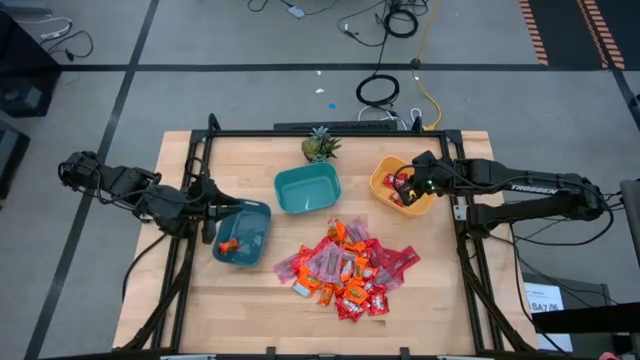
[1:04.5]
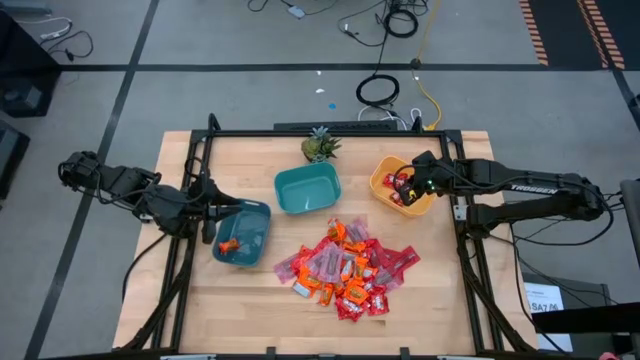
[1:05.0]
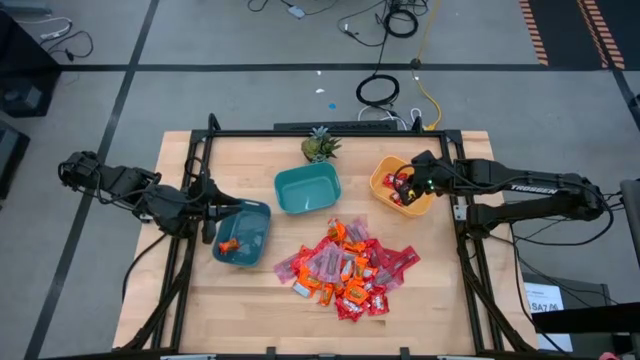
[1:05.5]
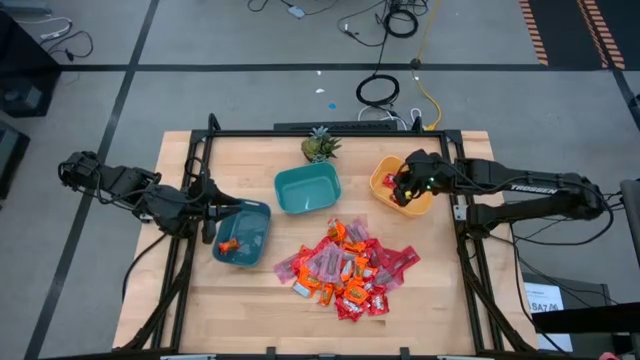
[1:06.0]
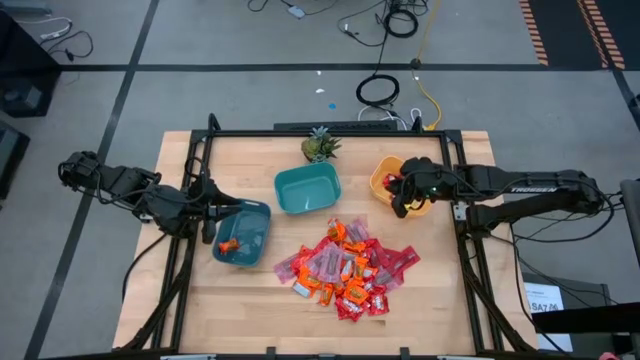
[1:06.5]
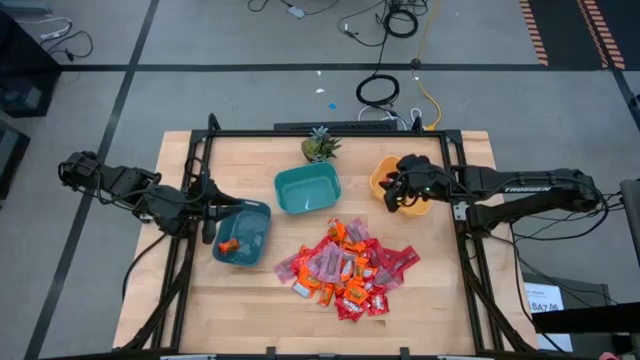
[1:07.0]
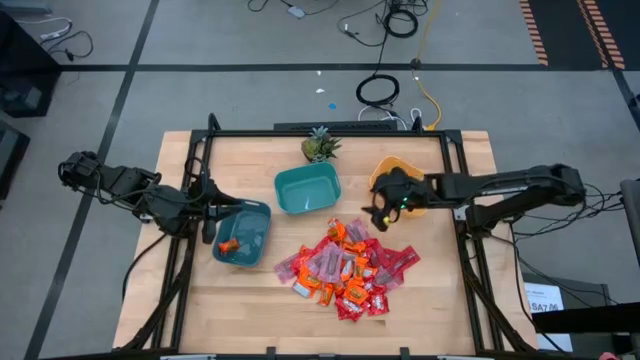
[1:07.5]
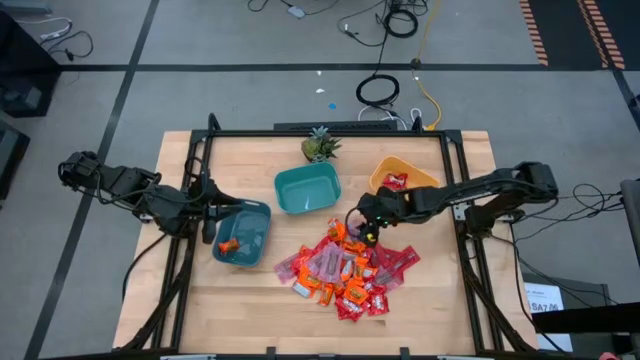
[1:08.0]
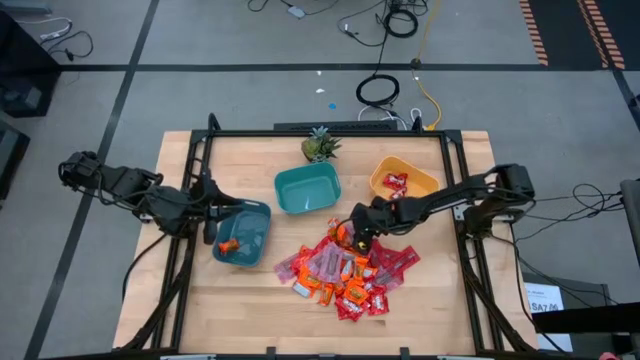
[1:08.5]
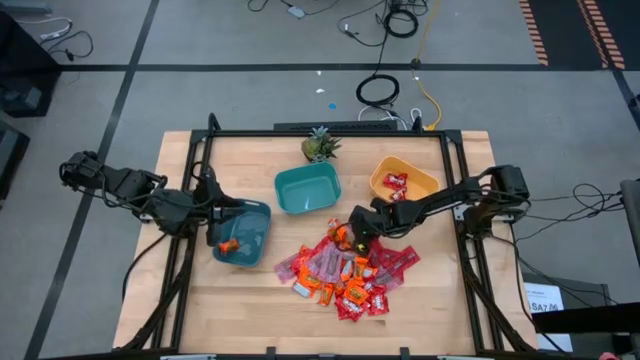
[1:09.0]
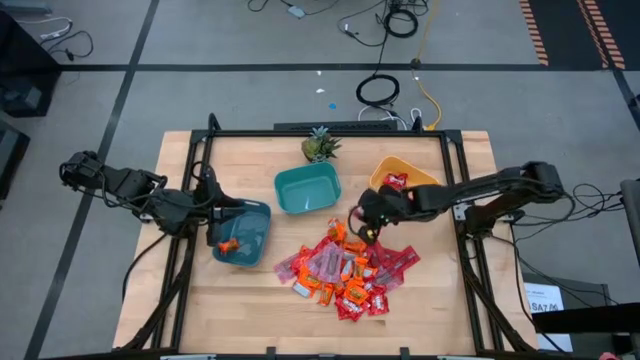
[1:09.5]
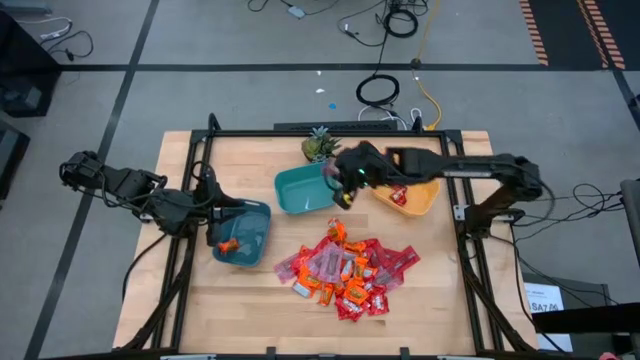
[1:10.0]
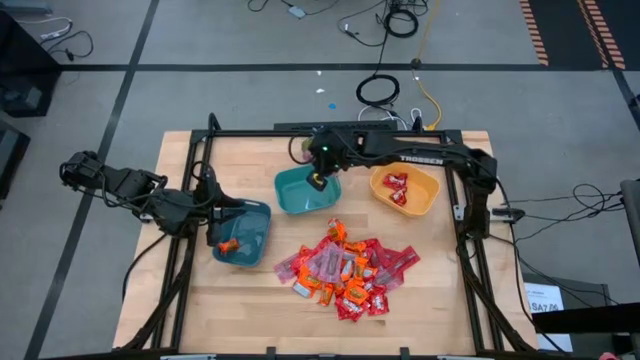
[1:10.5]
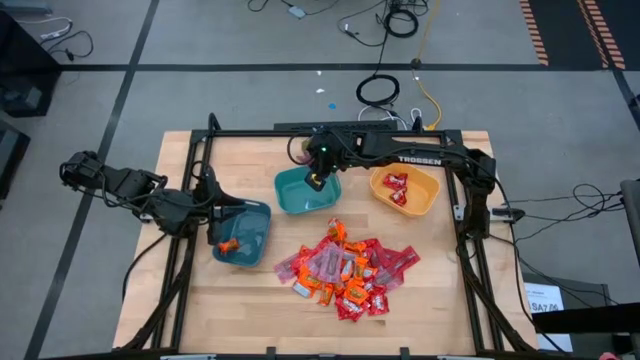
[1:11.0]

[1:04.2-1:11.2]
Task: Sort candy
Put the pink candy into the light blue bin

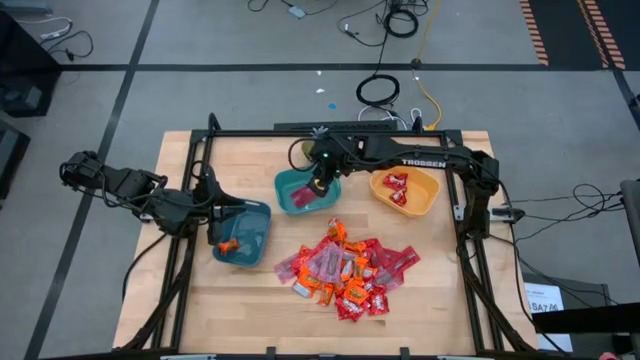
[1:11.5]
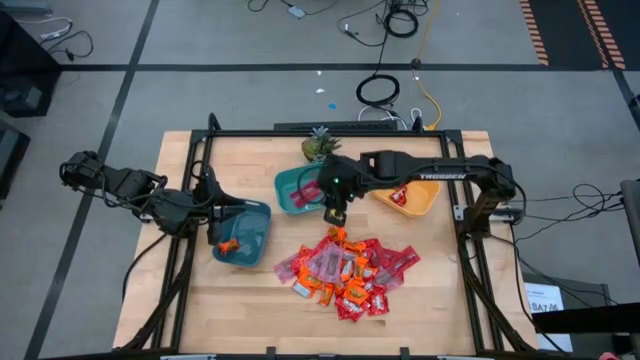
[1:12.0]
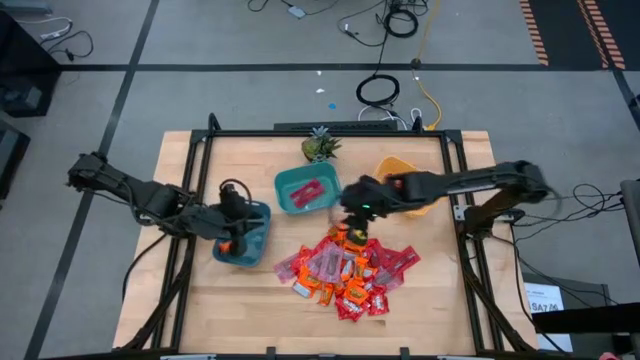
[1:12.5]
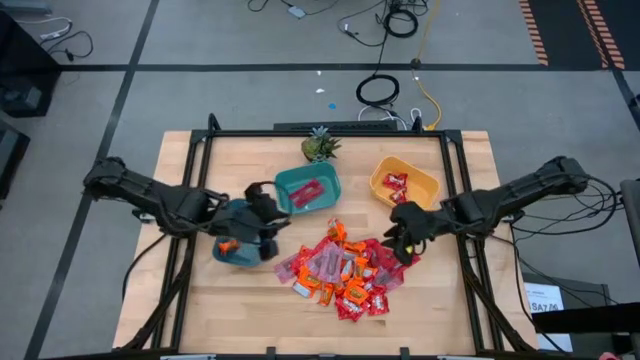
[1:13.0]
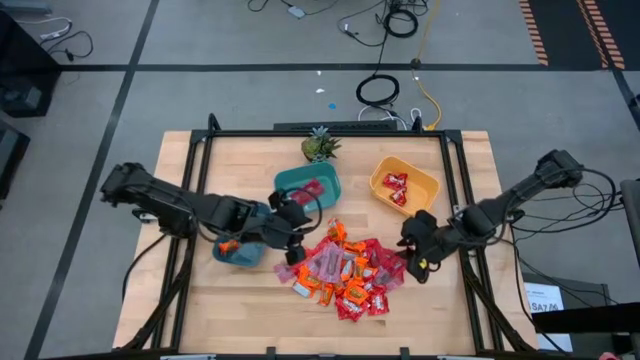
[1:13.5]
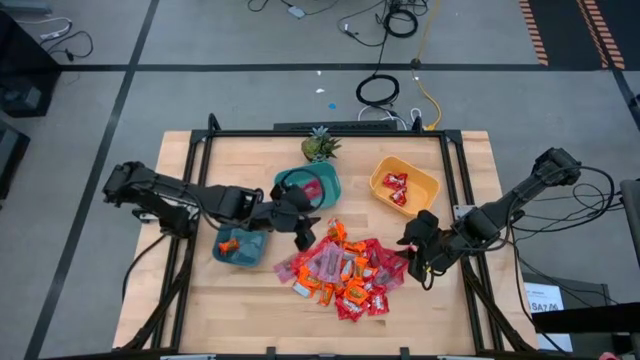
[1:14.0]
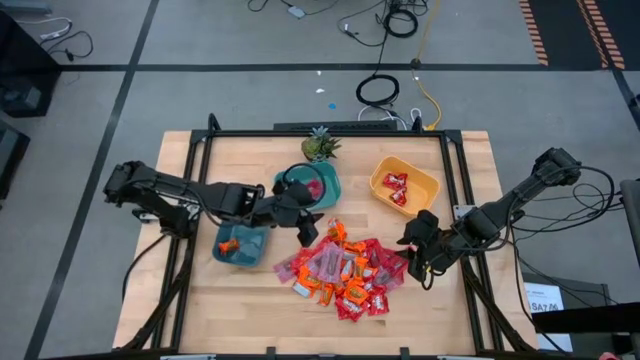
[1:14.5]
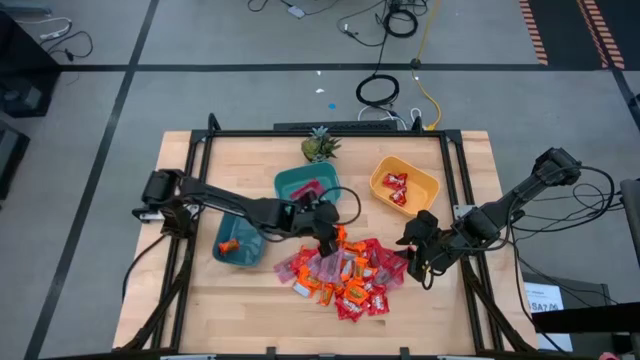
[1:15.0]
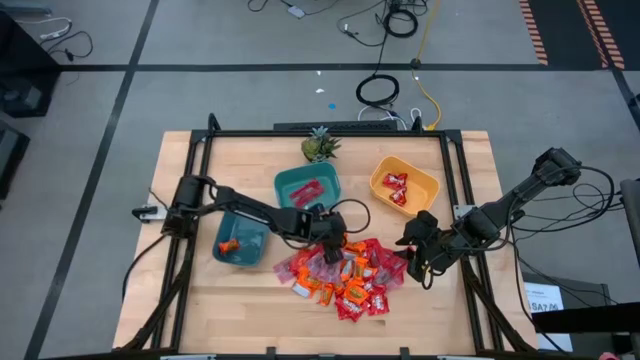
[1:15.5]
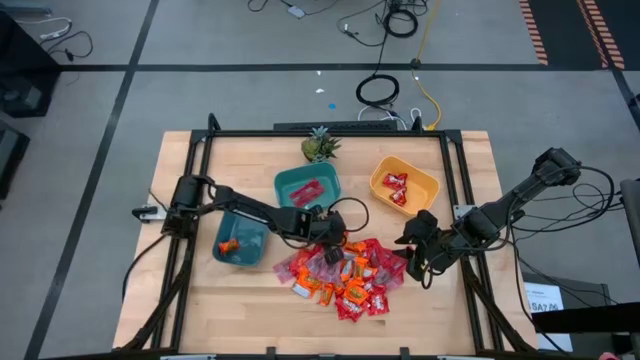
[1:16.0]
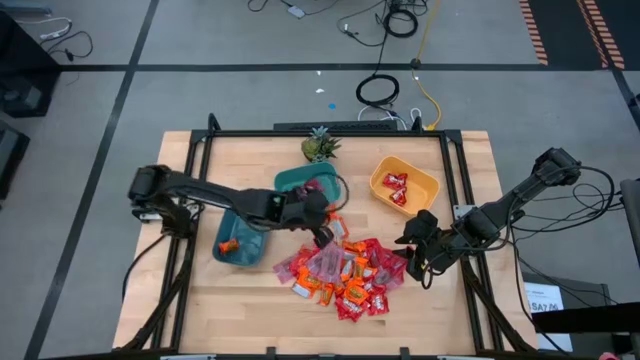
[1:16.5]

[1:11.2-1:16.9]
Put the orange chocolate into the blue bin

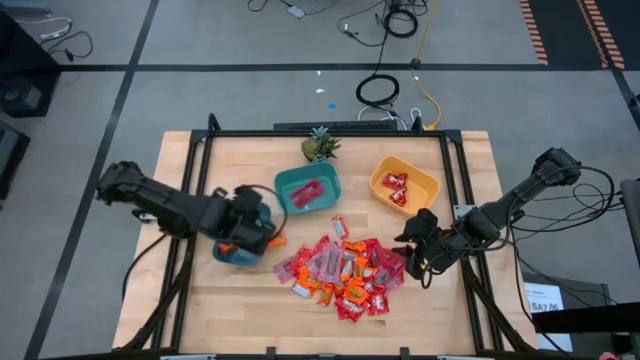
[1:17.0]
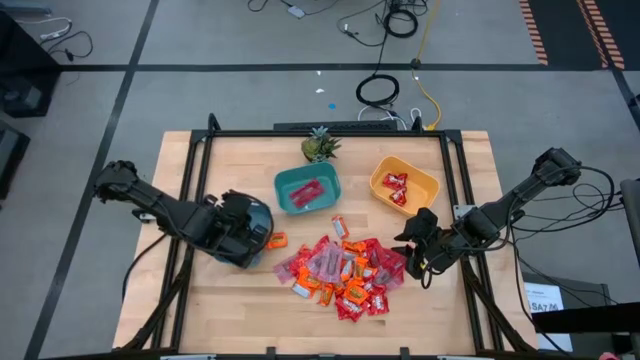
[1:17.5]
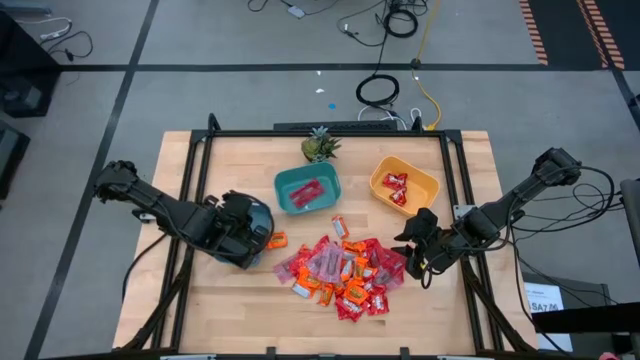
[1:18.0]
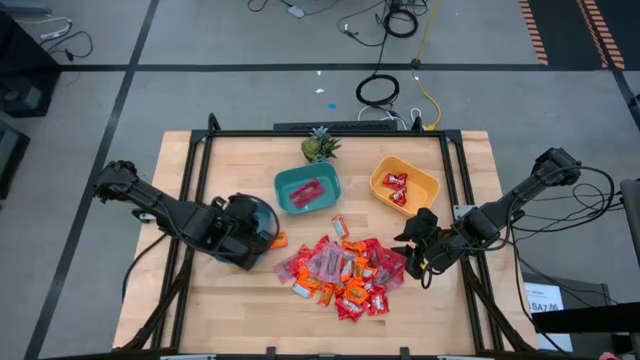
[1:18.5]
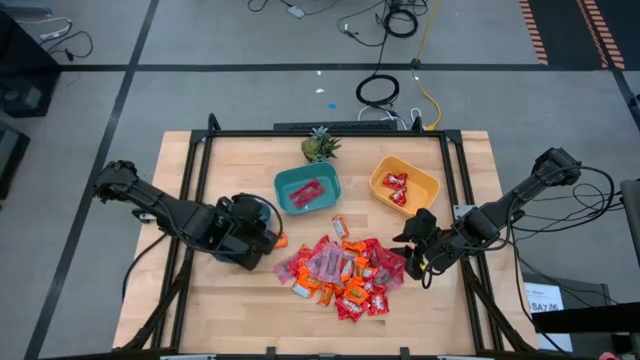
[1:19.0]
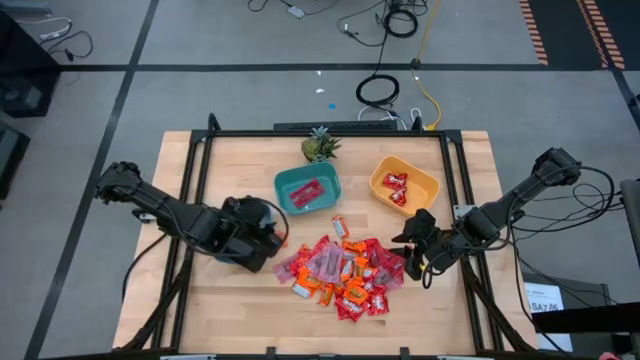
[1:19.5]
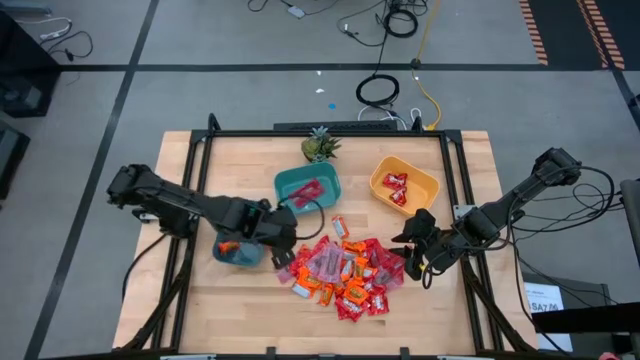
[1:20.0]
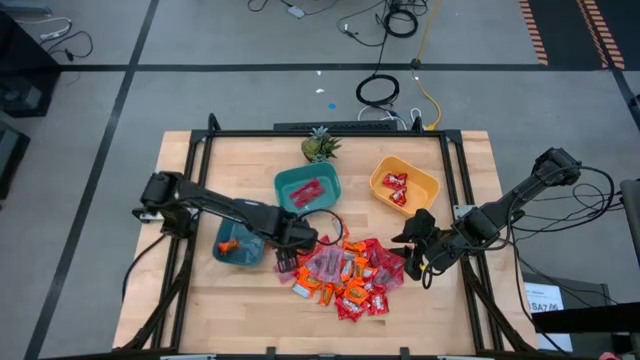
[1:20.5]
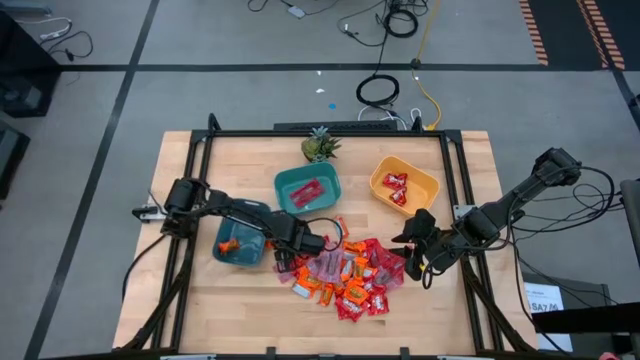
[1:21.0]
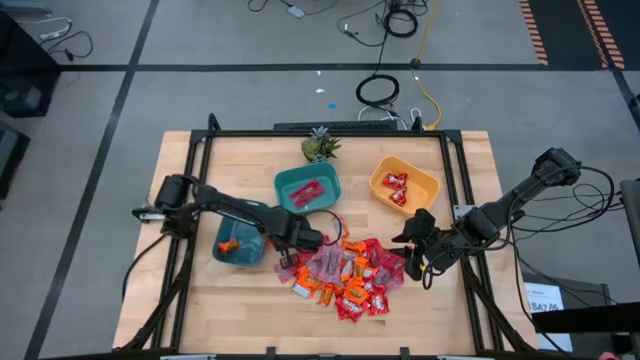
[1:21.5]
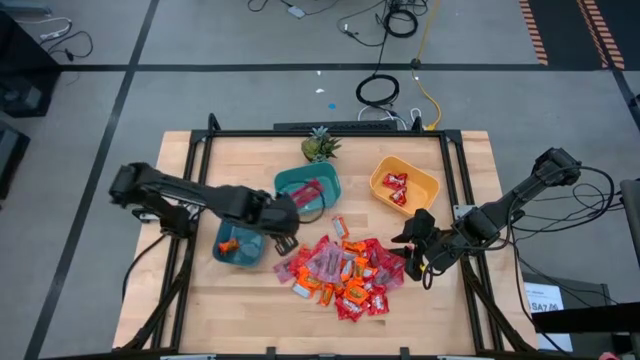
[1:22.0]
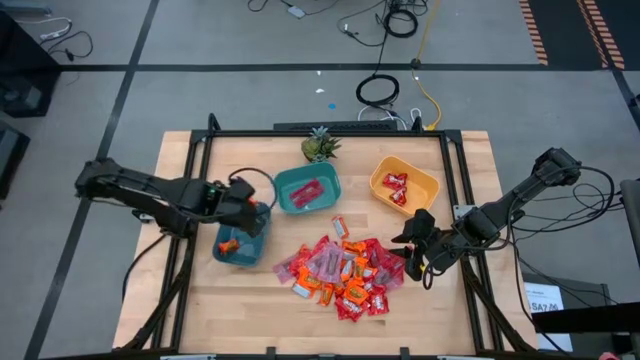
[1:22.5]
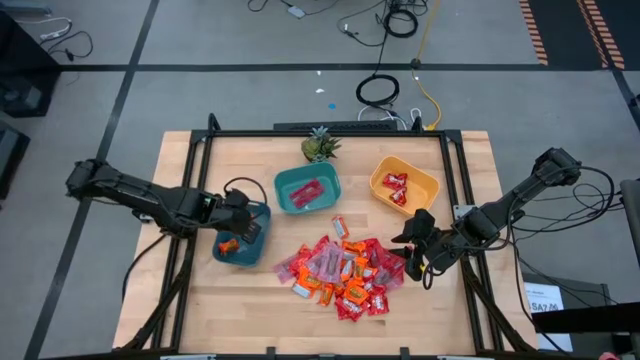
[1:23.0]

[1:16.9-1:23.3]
Put the orange chocolate into the blue bin

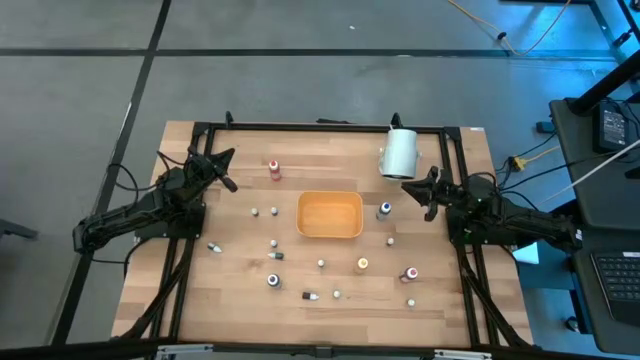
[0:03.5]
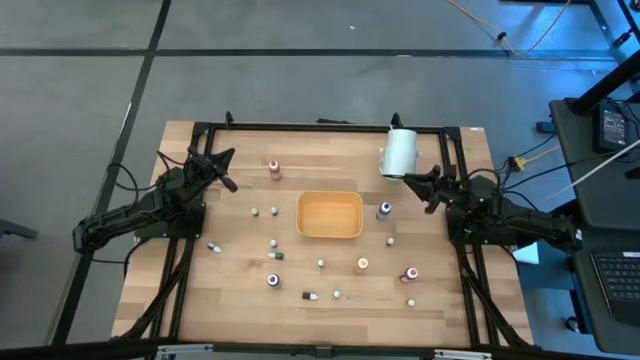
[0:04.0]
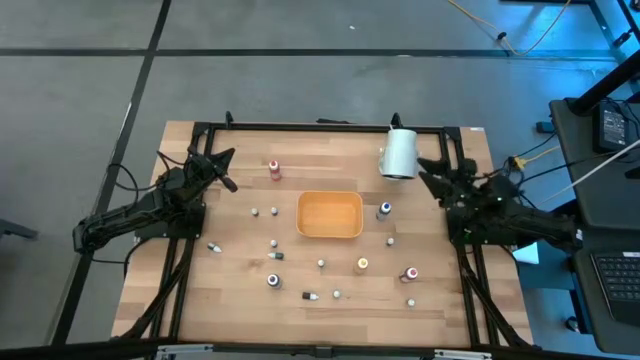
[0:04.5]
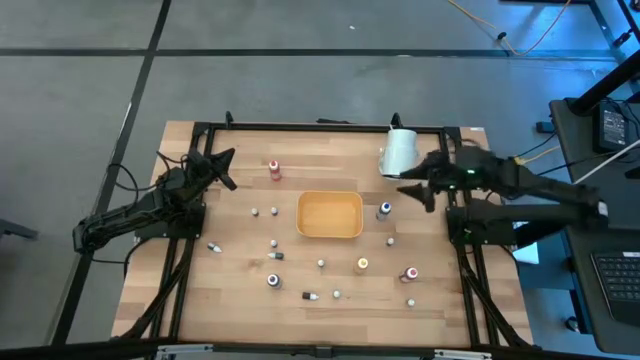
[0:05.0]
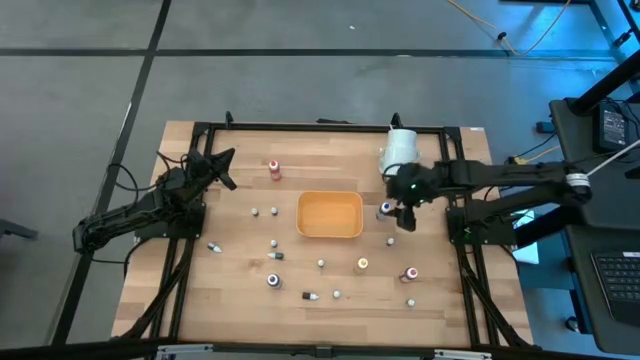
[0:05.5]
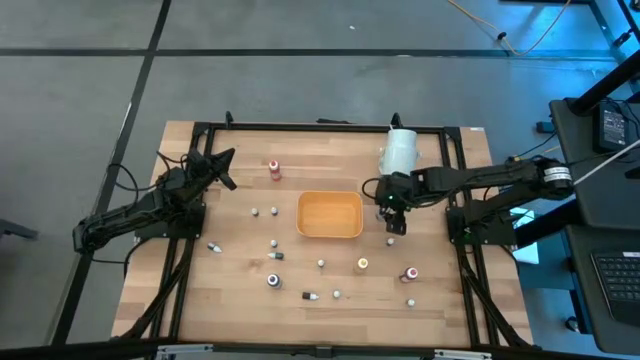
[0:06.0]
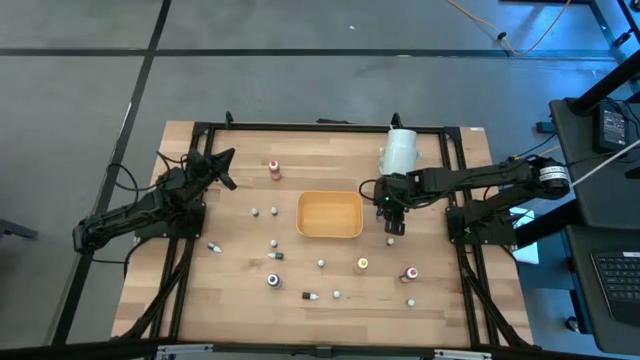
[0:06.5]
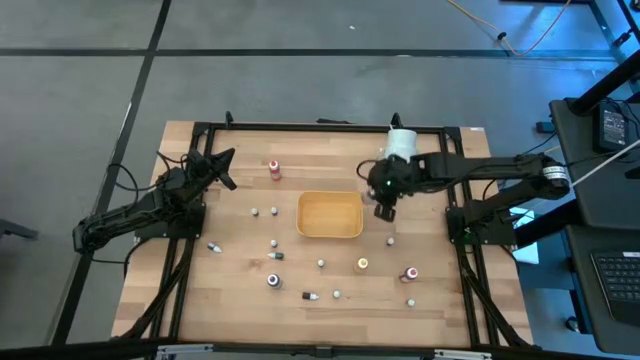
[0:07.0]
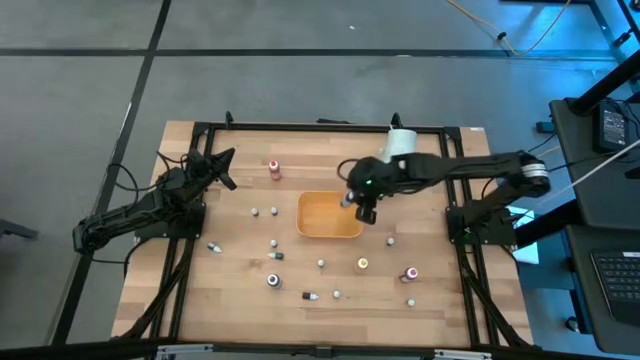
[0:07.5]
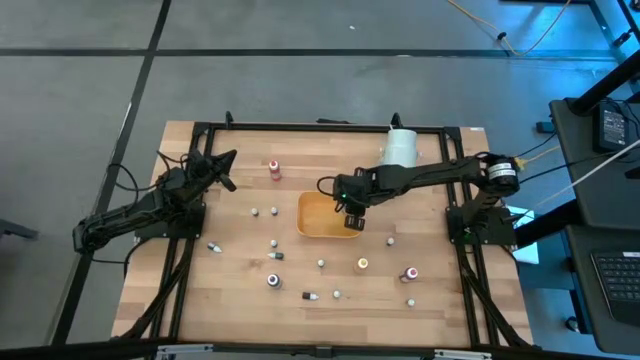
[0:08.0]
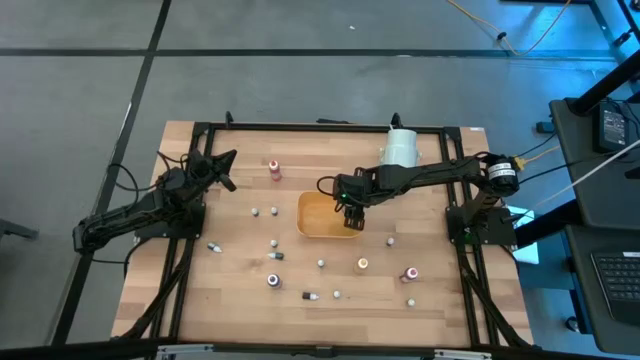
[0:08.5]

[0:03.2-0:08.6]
Task: Pick & Place food coloring
Put the large blue food coloring bottle into the yellow bin
